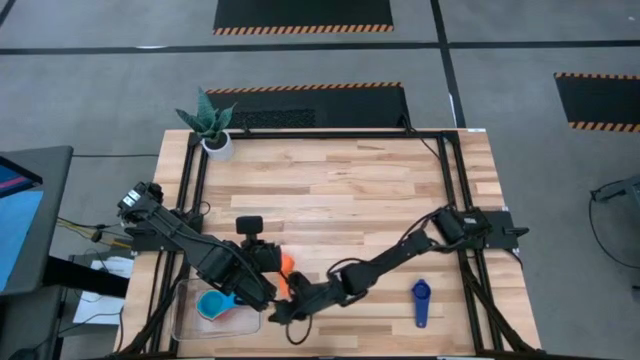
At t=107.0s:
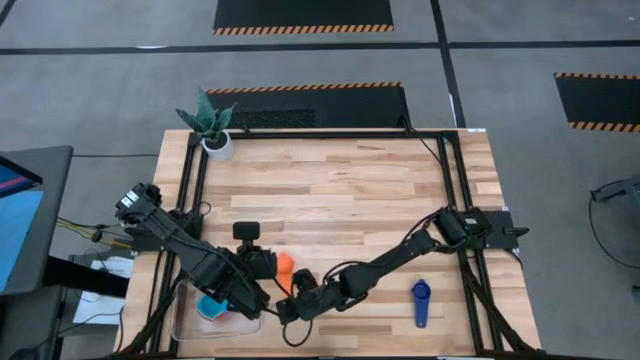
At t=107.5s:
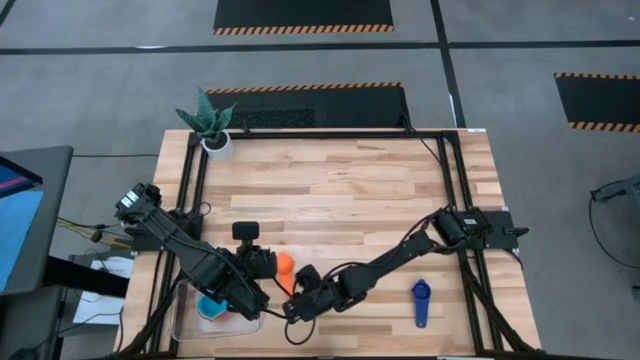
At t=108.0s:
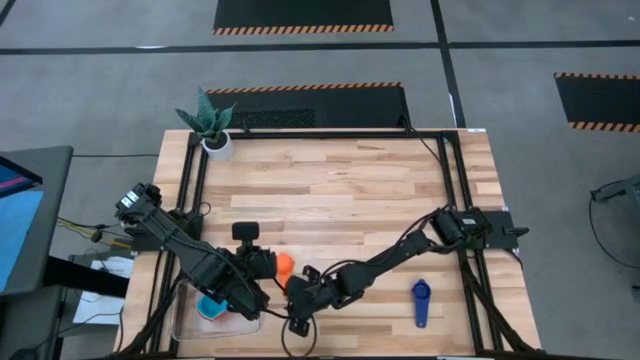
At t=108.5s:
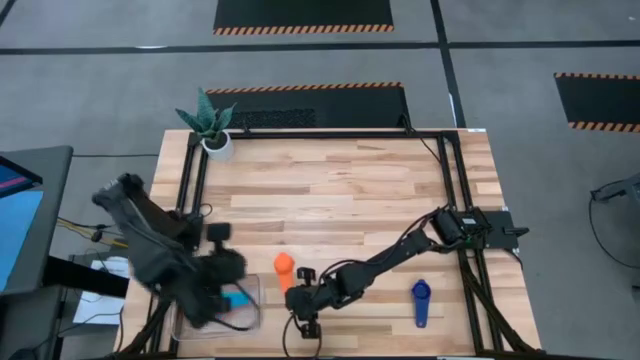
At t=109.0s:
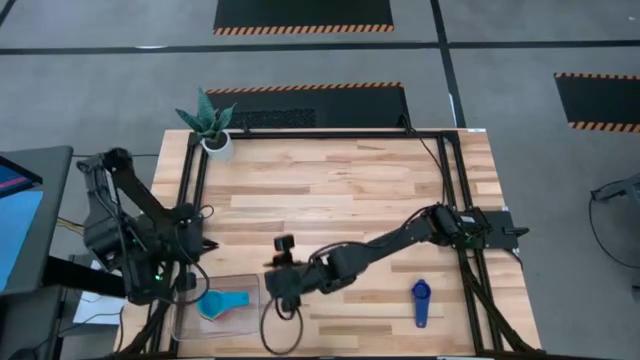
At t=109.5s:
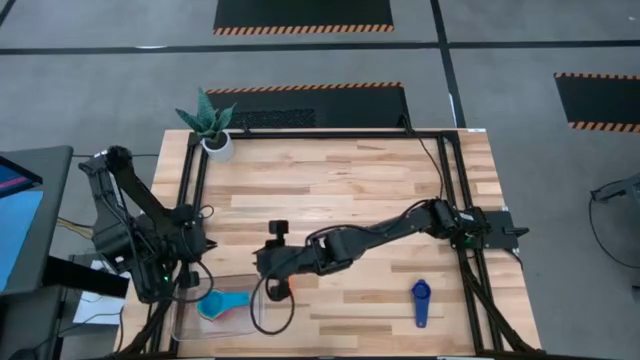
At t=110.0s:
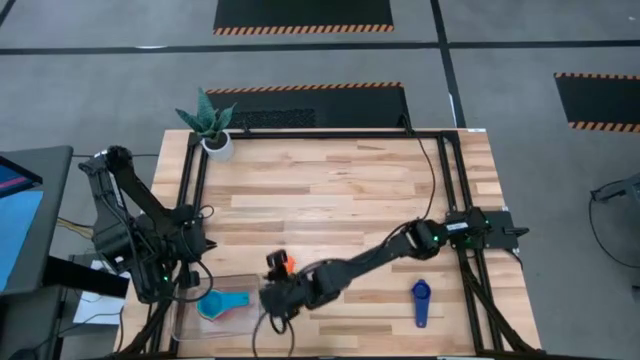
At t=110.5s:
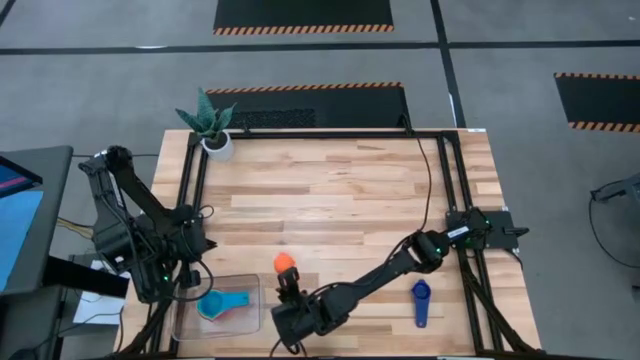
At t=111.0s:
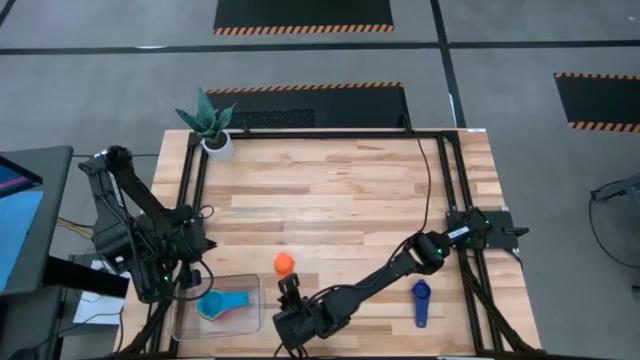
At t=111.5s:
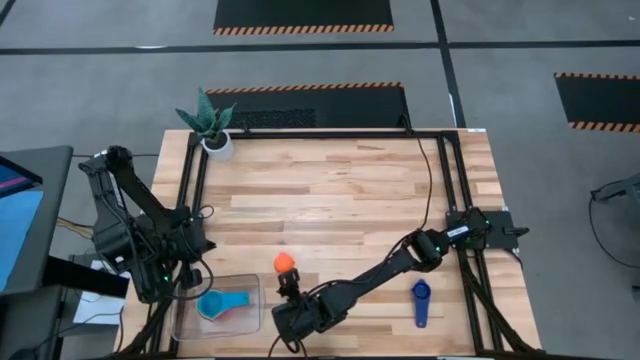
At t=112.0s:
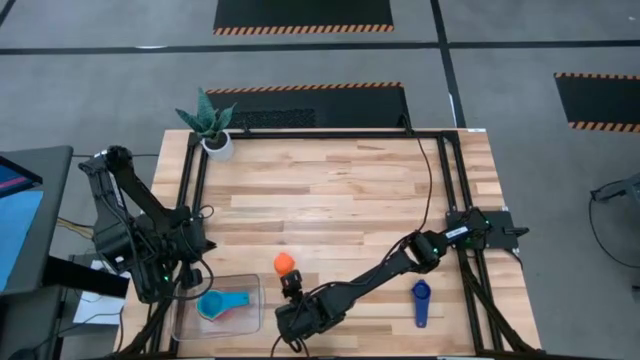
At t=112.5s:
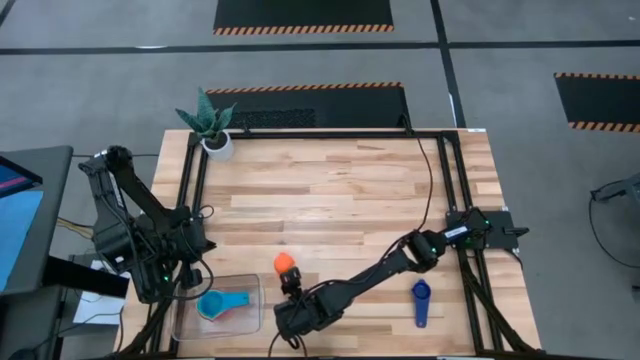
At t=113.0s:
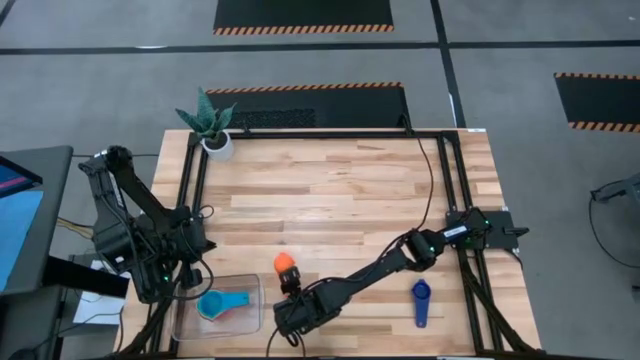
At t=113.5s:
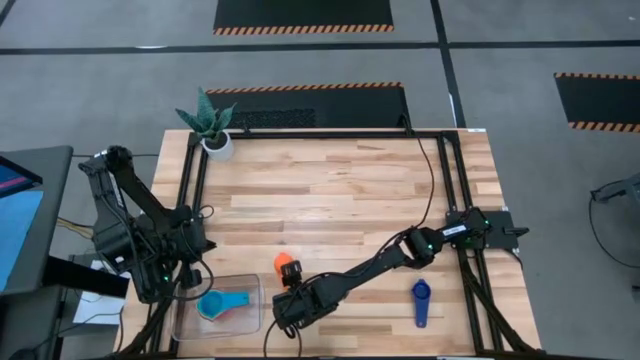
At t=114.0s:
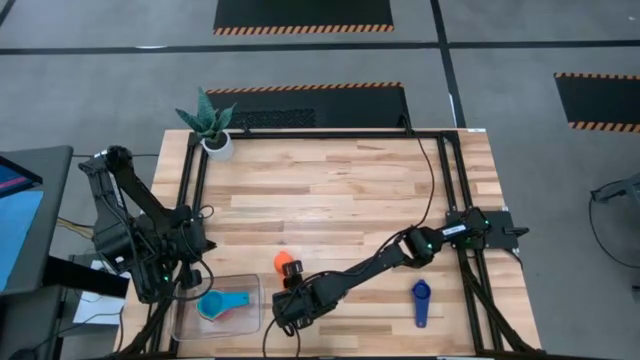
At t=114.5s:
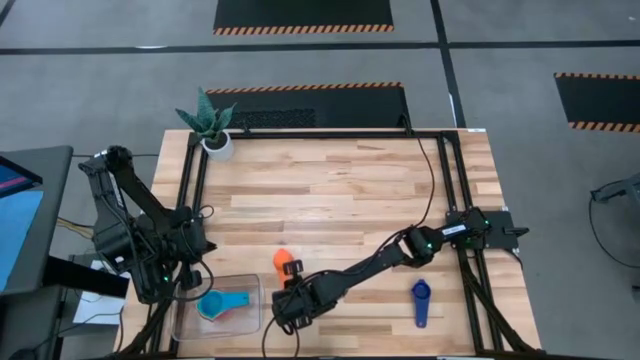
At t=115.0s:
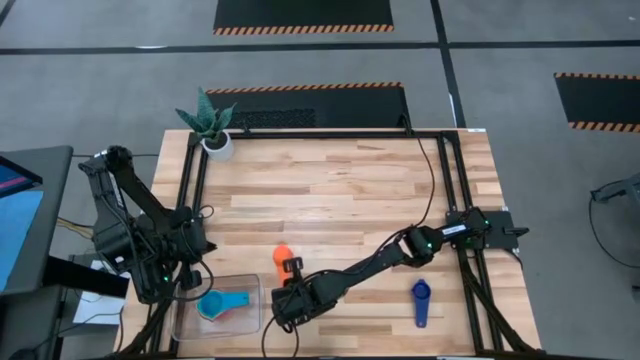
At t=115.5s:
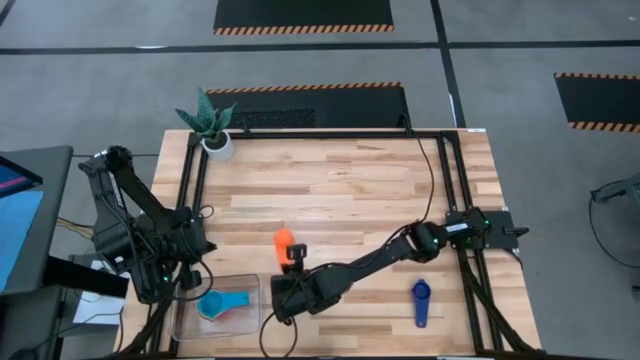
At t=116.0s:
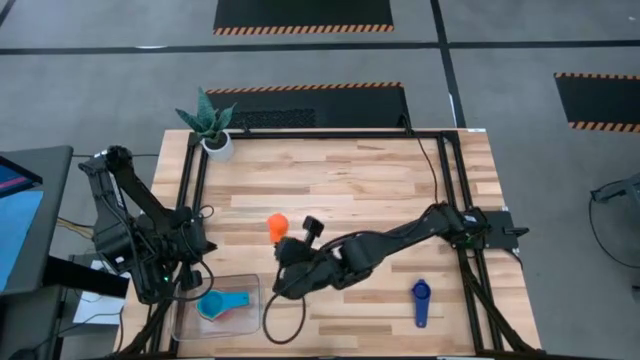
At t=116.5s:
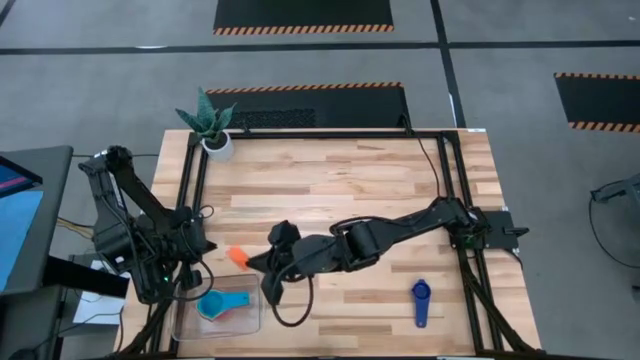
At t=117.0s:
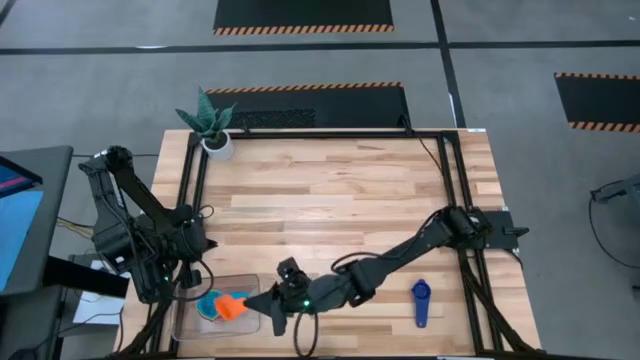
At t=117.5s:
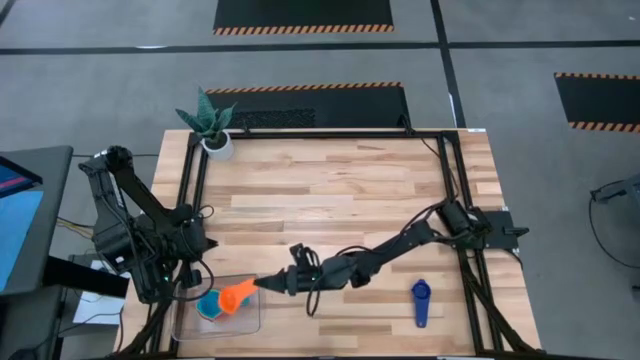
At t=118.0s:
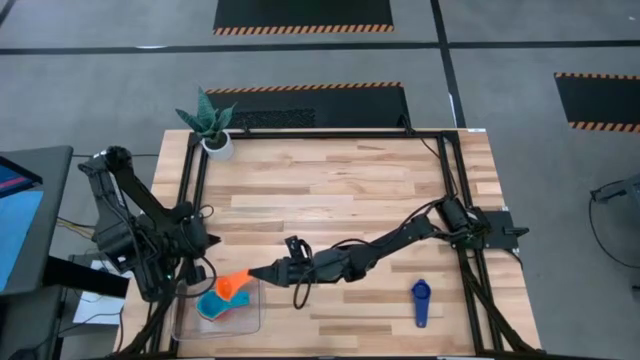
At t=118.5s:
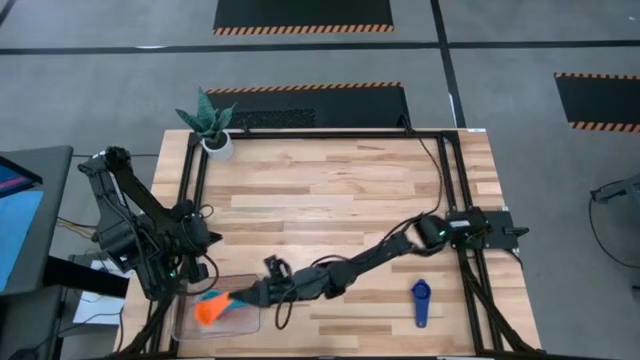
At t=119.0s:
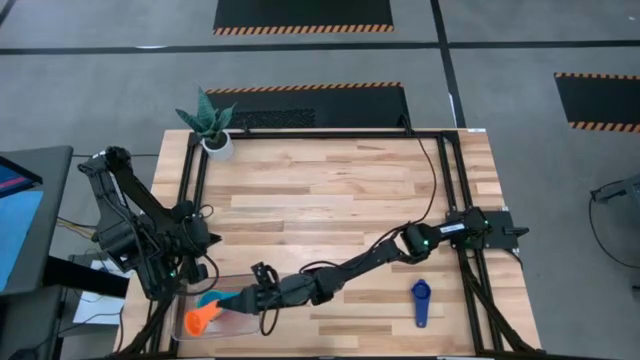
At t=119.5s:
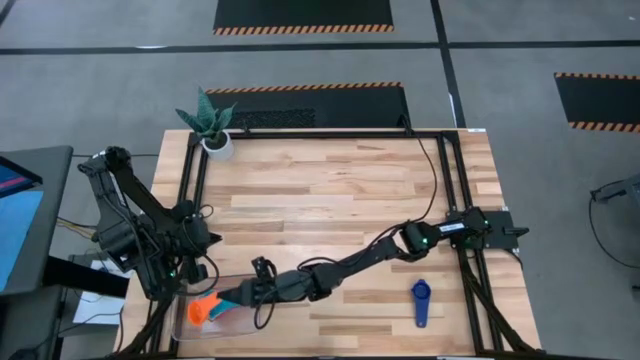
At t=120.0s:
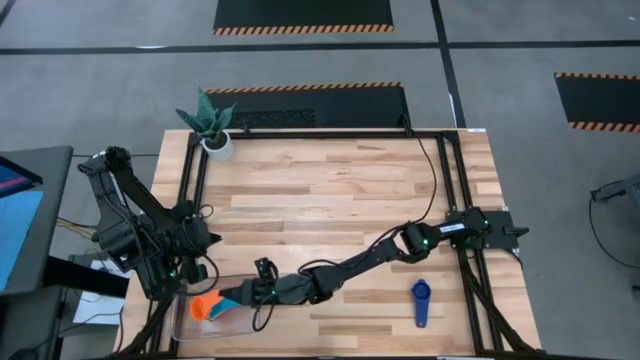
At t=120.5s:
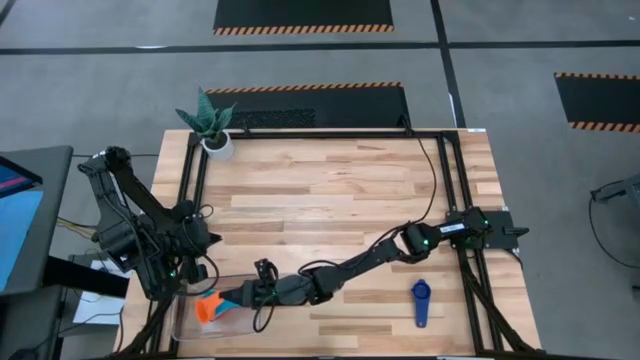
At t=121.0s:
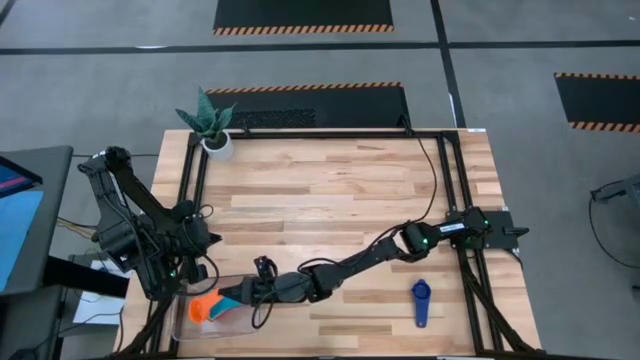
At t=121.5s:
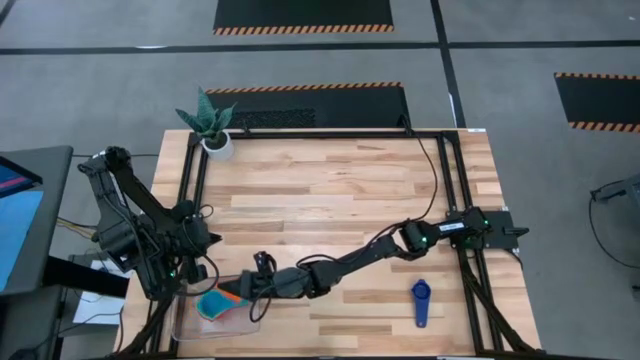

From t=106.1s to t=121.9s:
Task: Nest measuring cups in basket
Stack the orange measuring cup on top of the light blue measuring cup in the transparent bin

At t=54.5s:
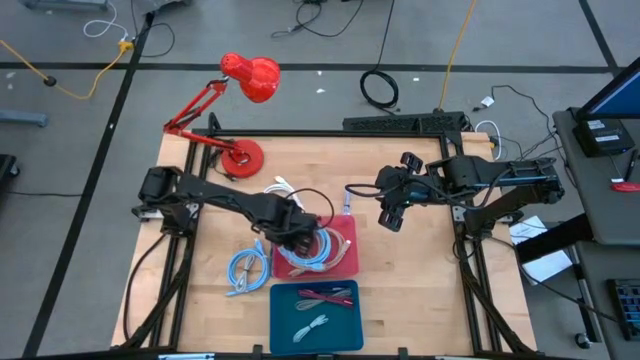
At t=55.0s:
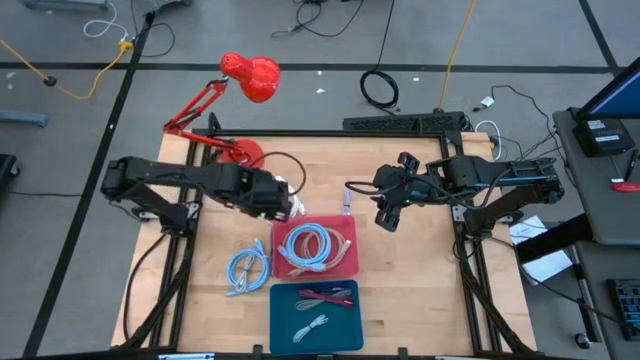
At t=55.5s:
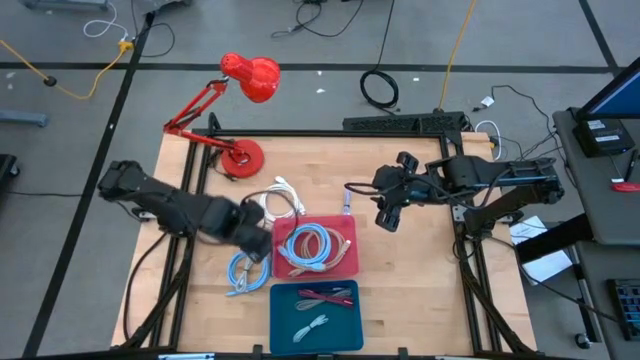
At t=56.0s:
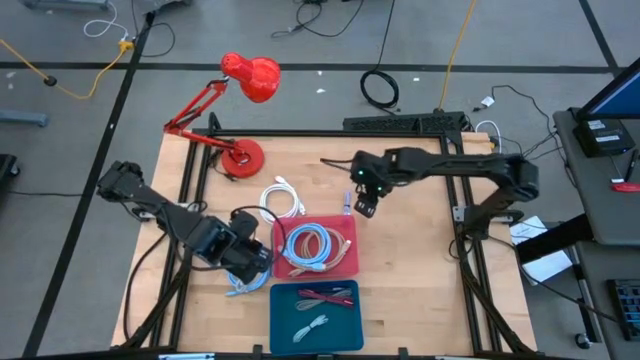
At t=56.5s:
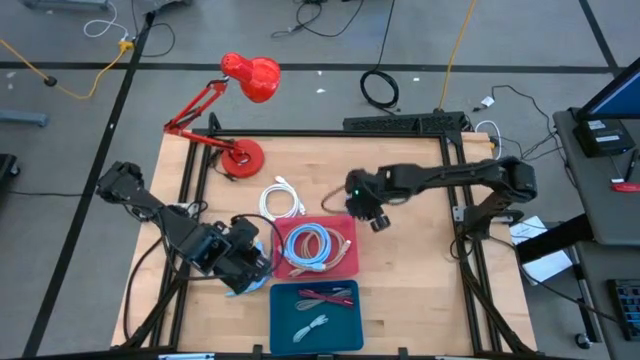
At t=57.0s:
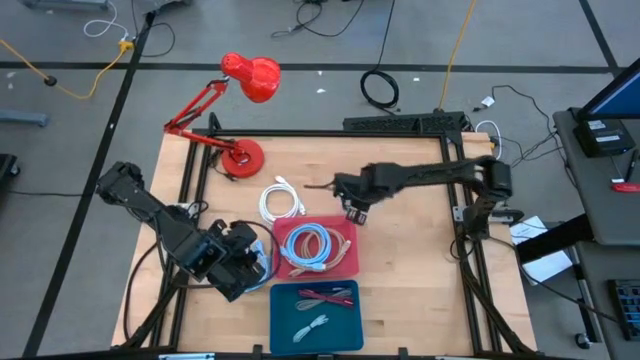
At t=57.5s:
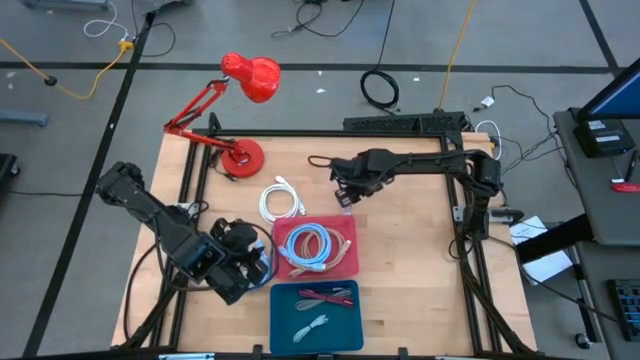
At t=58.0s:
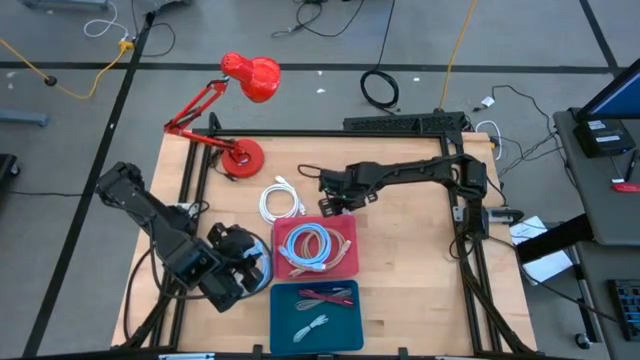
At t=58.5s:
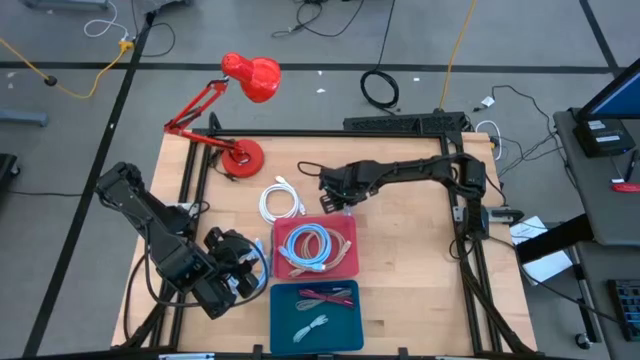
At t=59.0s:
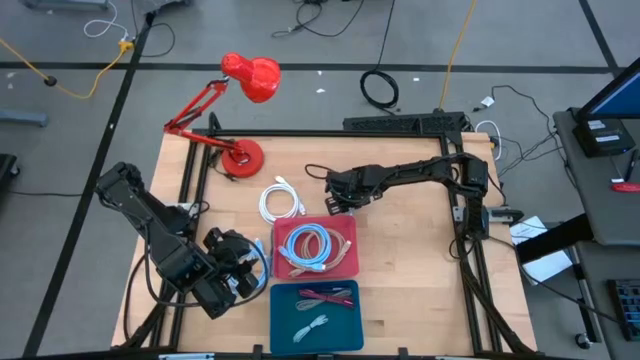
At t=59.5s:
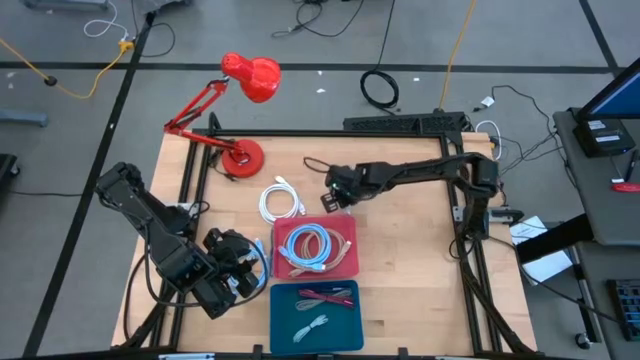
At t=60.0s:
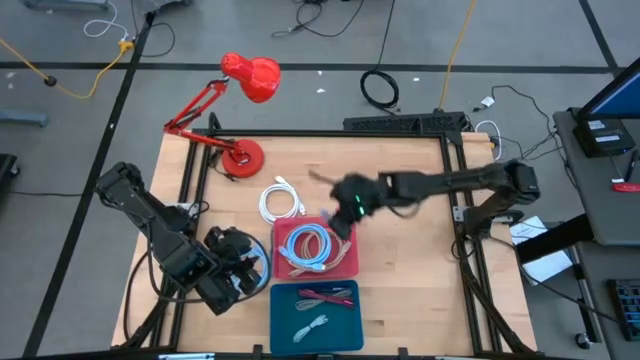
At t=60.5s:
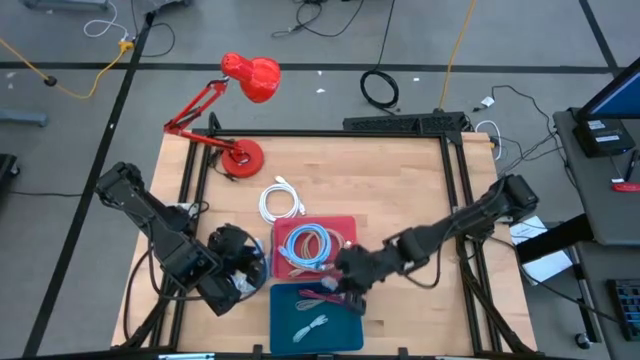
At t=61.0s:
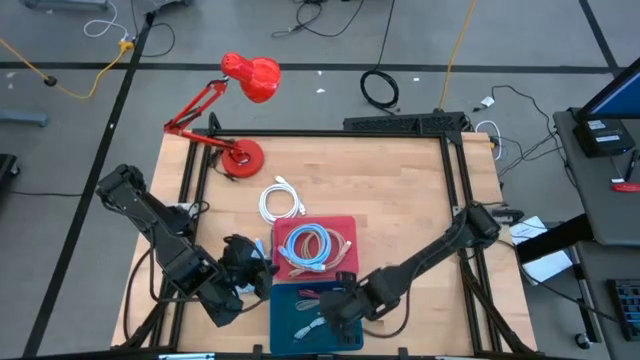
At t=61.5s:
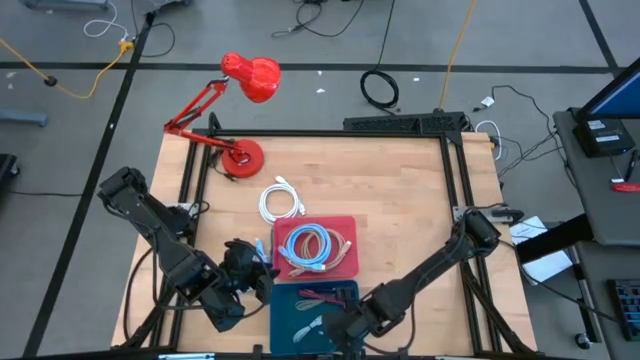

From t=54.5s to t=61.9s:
Task: Pick & Place USB Port
Put the purple charger cable into the blue bin
